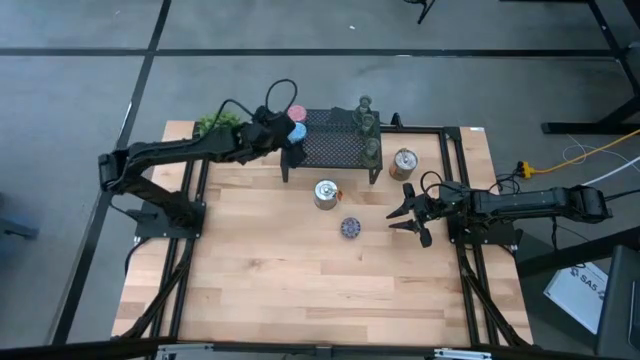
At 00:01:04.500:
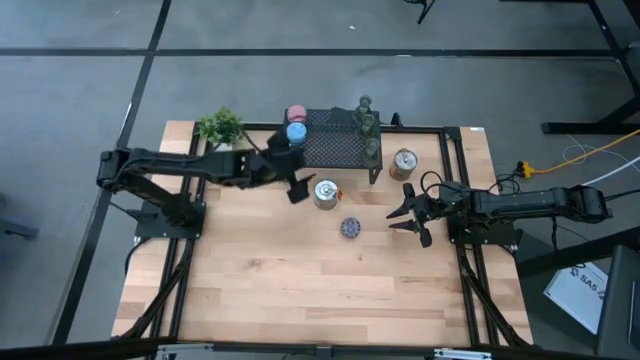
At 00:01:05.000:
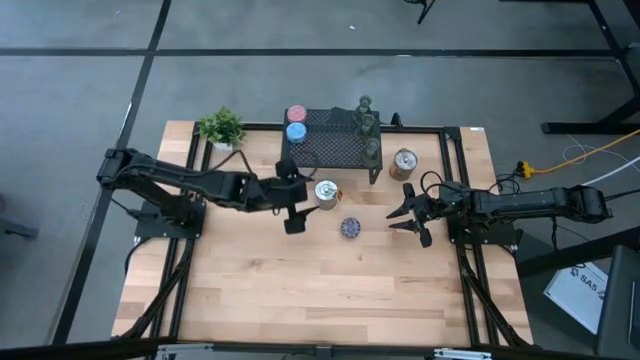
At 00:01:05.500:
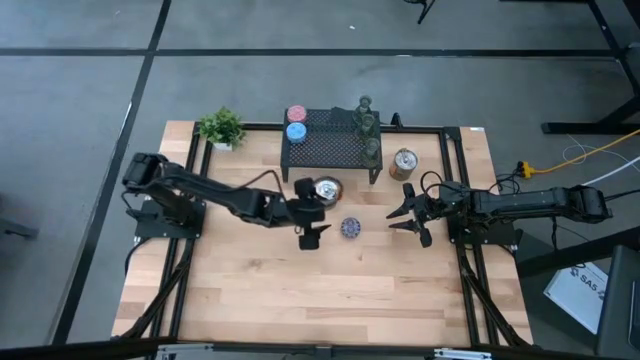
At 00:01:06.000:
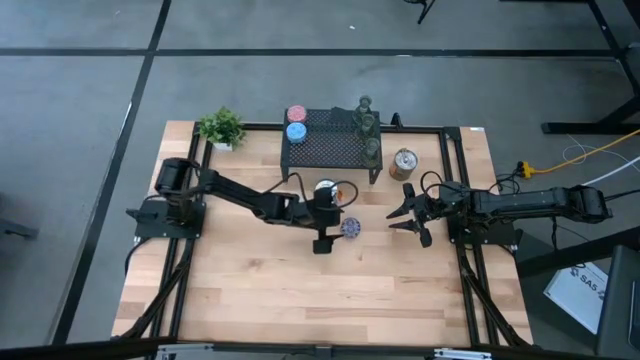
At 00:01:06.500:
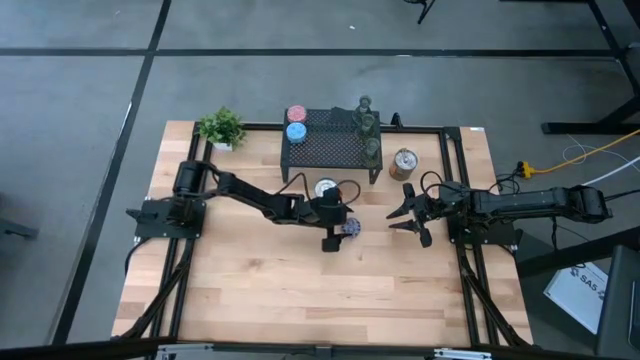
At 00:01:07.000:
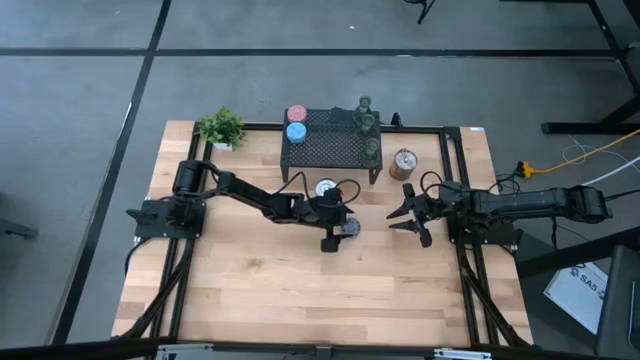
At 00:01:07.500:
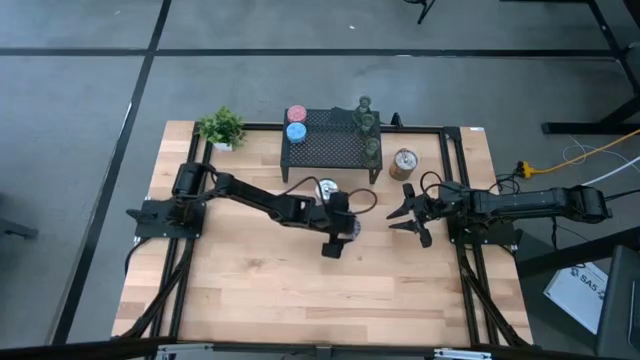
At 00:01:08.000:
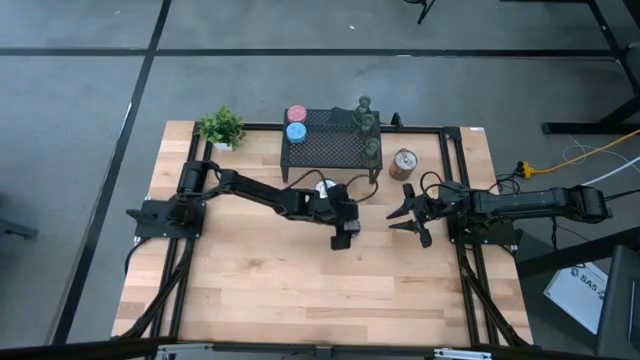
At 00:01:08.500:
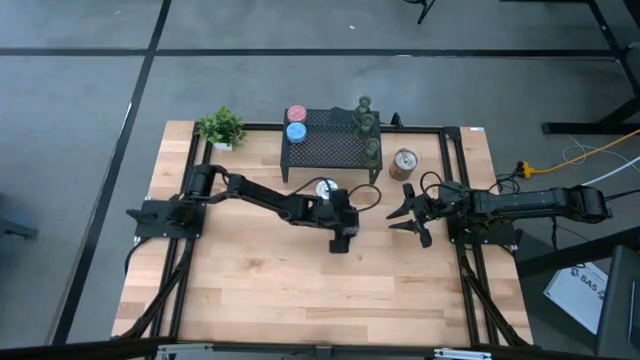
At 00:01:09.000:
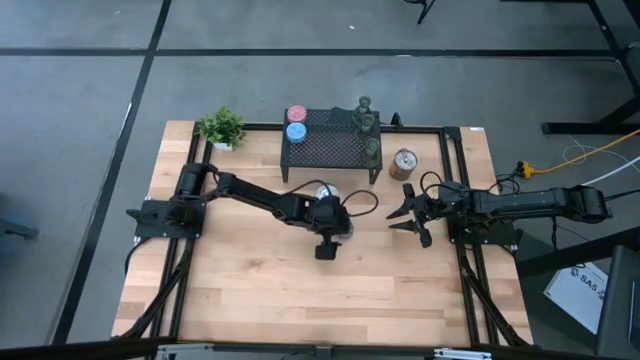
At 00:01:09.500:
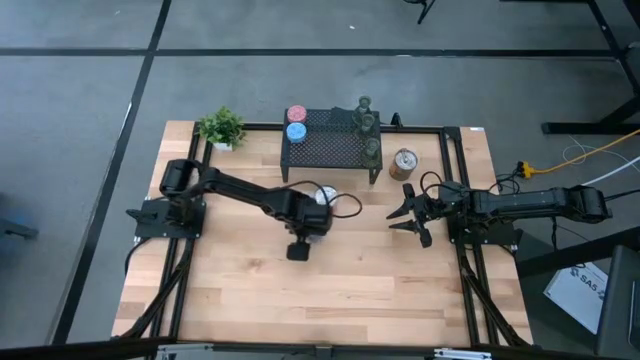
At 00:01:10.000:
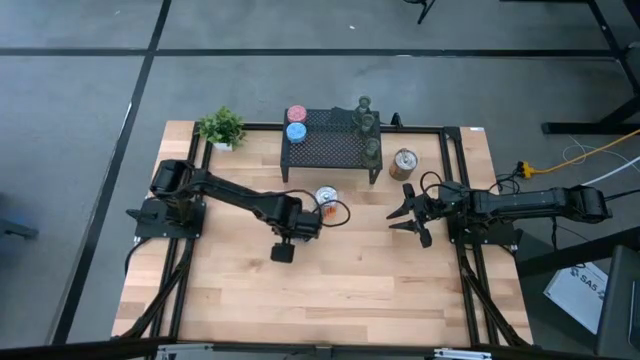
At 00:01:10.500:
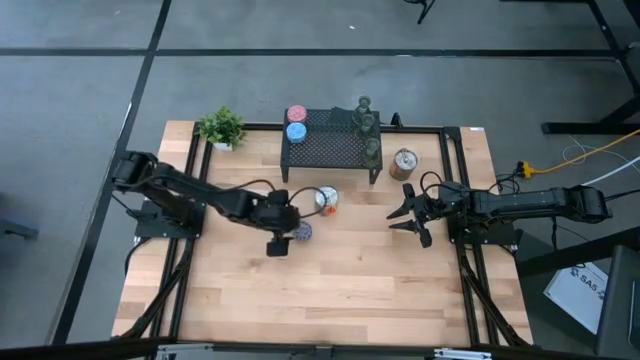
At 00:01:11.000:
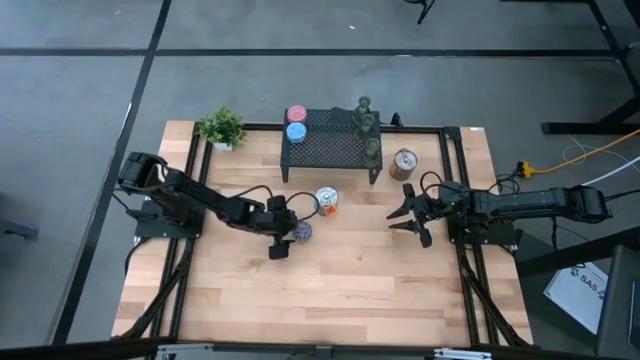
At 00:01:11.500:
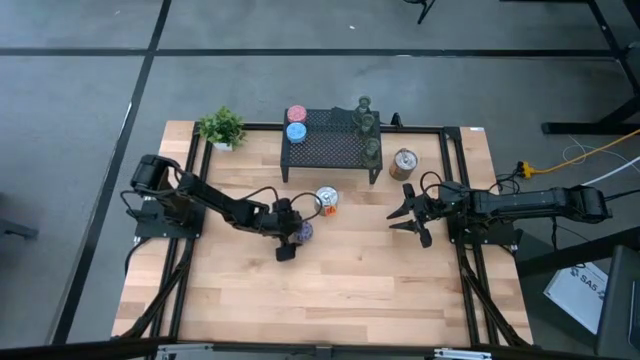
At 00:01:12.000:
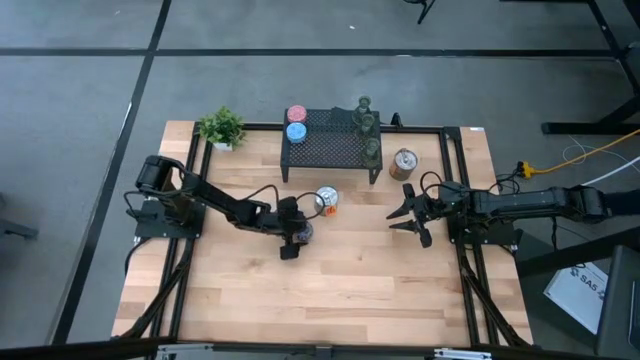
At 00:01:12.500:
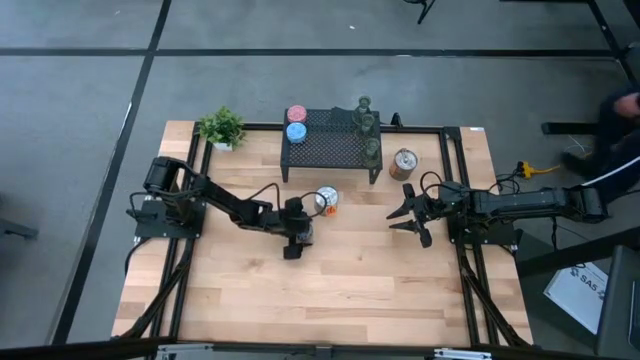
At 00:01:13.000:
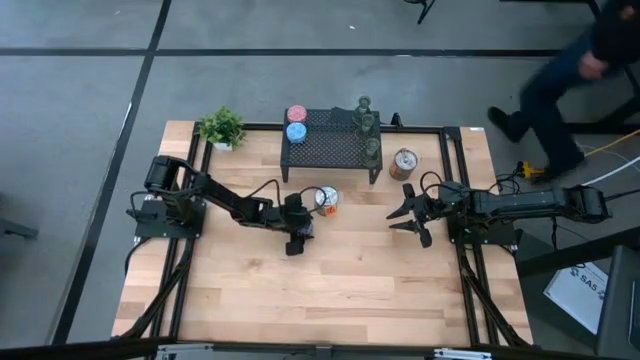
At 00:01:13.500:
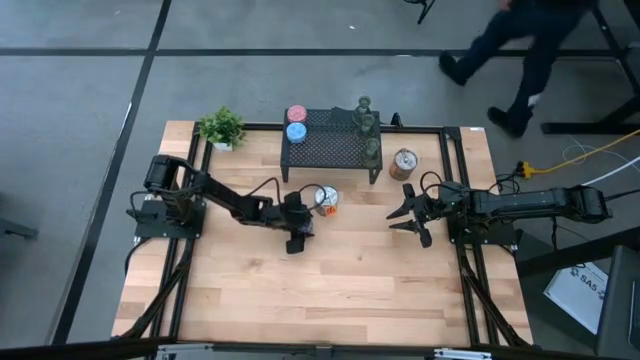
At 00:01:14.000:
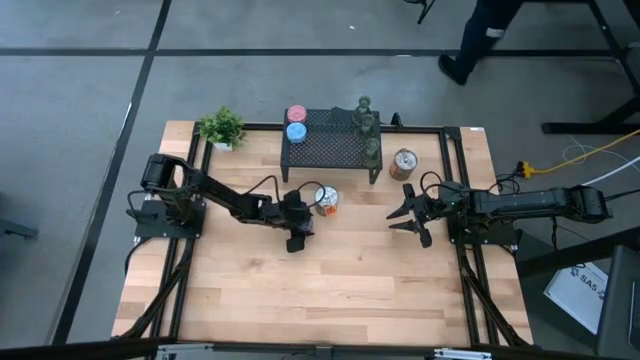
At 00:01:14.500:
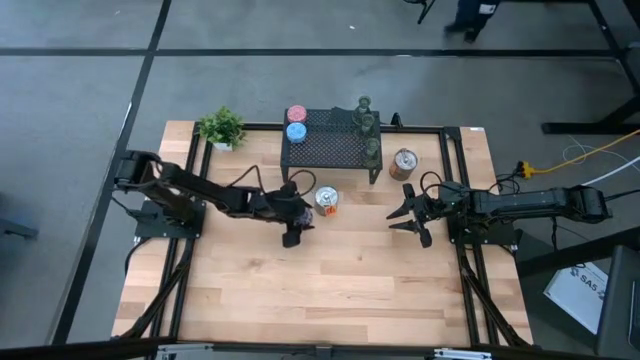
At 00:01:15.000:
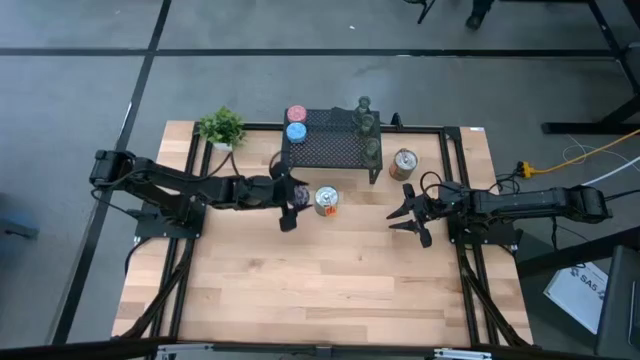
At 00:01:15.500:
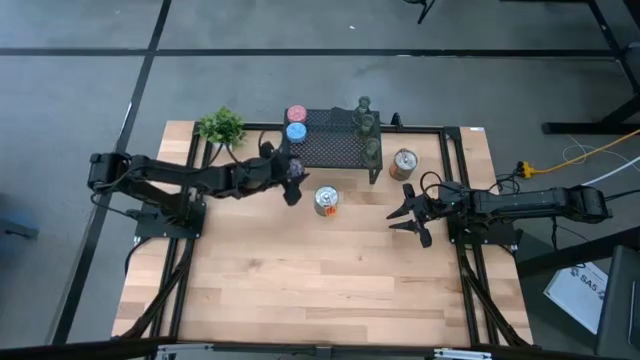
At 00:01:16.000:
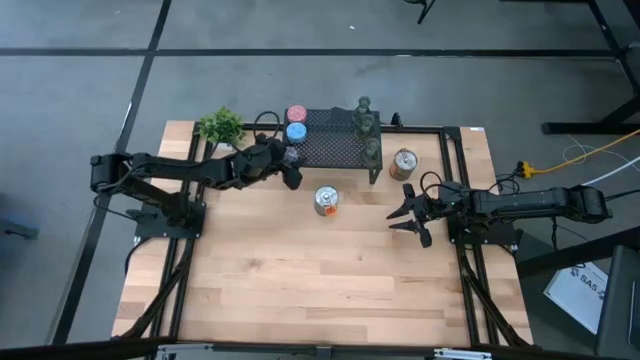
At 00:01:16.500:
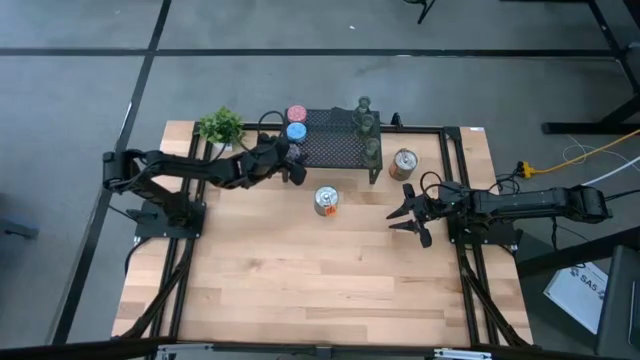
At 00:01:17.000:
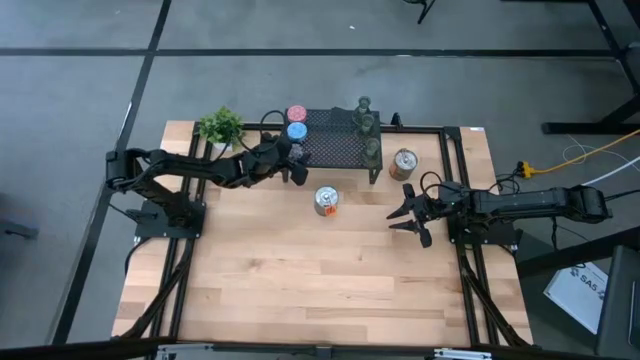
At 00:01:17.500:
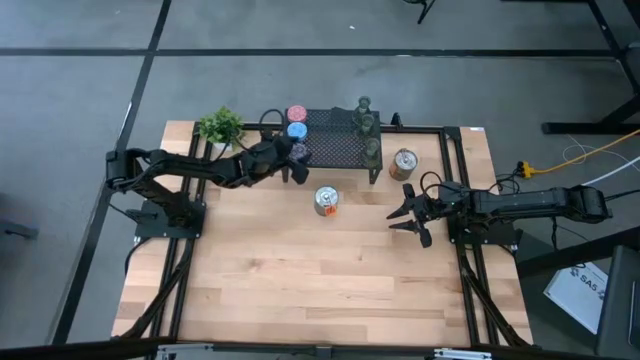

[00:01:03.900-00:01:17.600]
Task: Pick & Place candle stick holders
Put the black scented candle on the shelf

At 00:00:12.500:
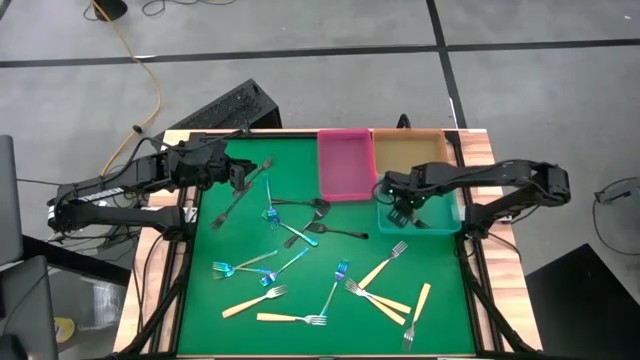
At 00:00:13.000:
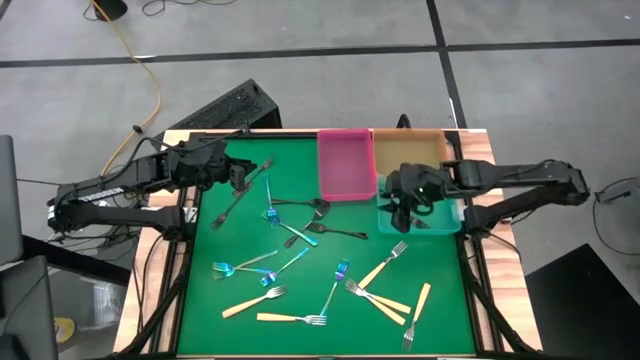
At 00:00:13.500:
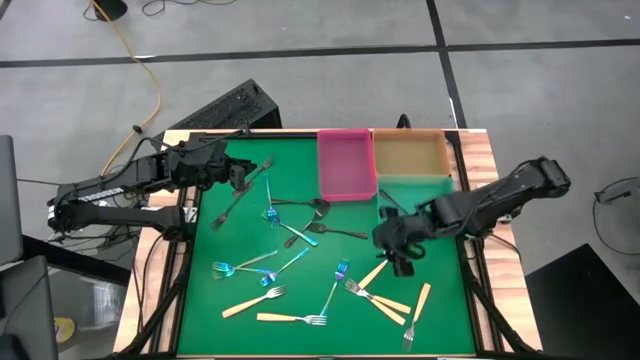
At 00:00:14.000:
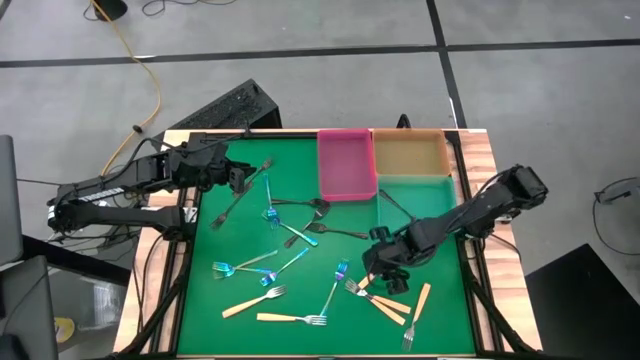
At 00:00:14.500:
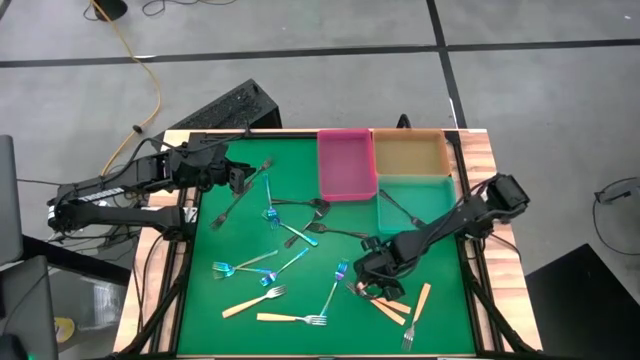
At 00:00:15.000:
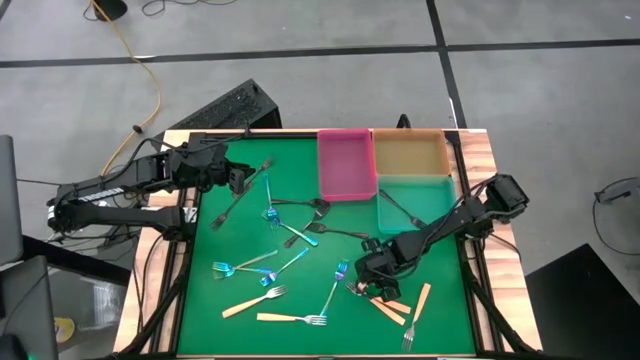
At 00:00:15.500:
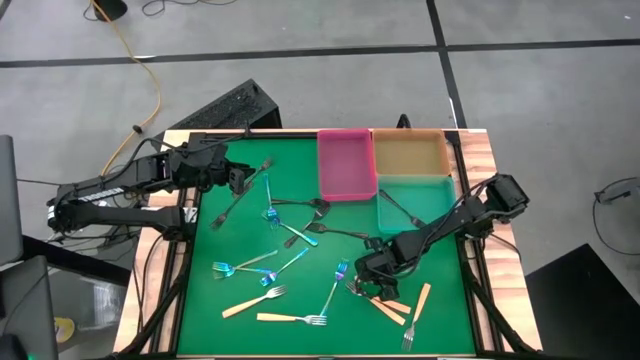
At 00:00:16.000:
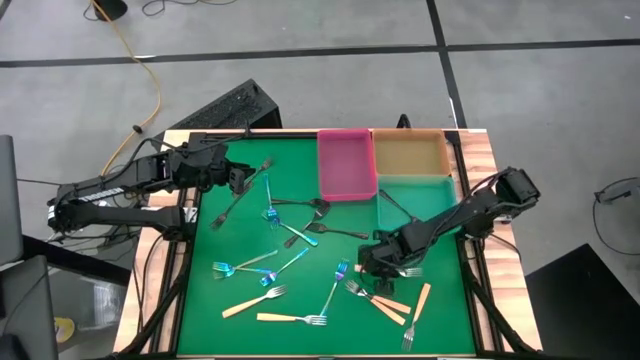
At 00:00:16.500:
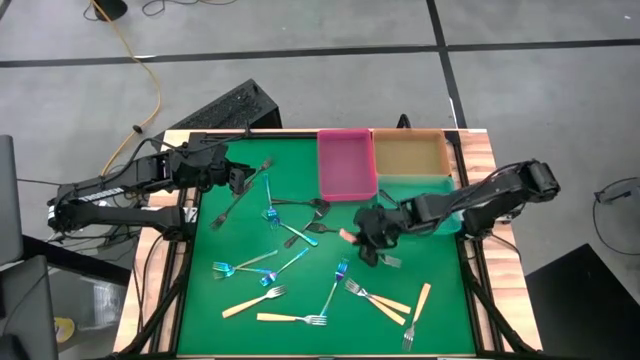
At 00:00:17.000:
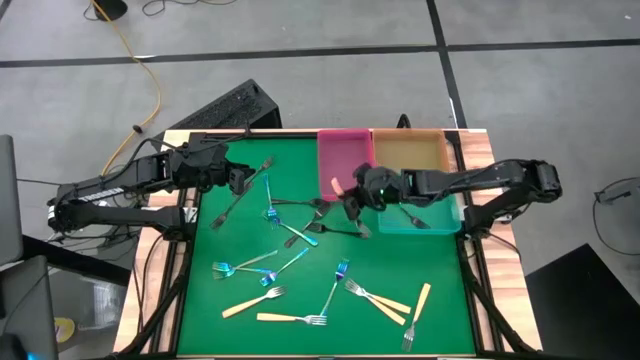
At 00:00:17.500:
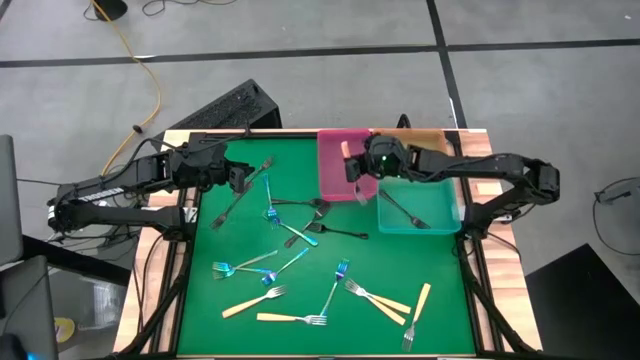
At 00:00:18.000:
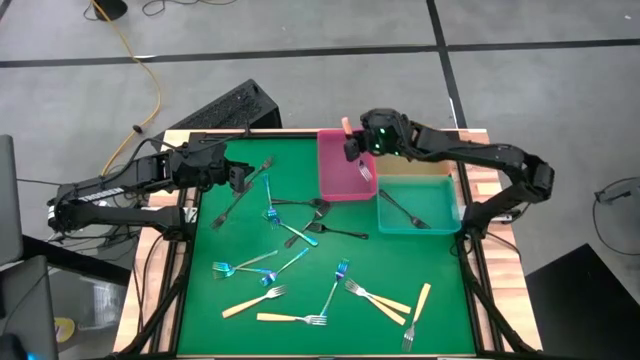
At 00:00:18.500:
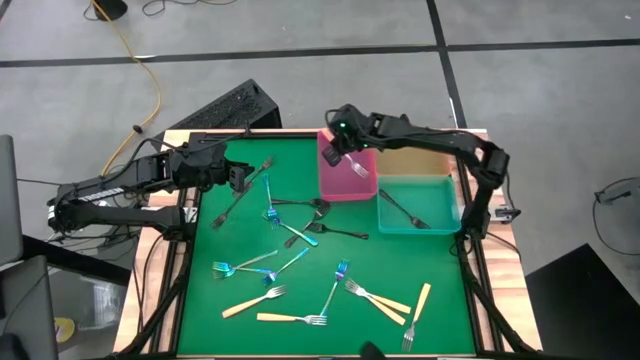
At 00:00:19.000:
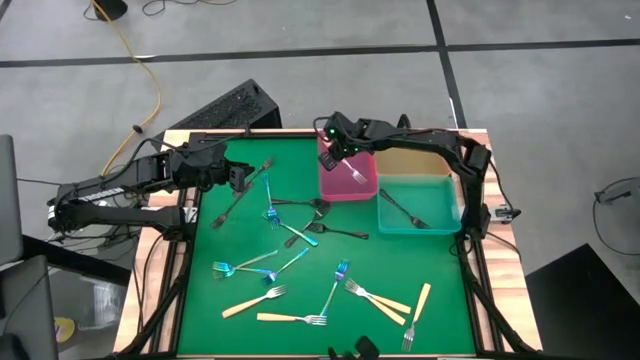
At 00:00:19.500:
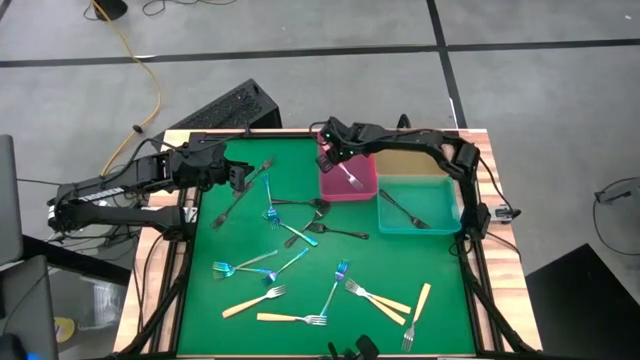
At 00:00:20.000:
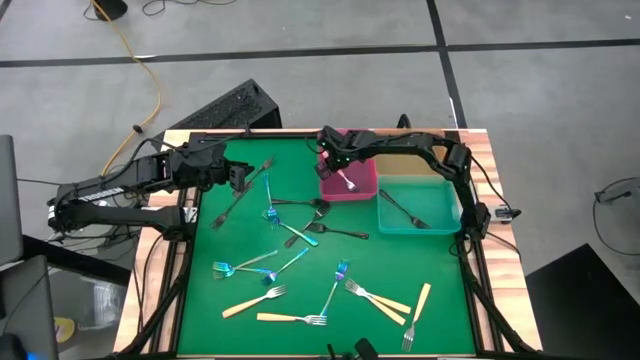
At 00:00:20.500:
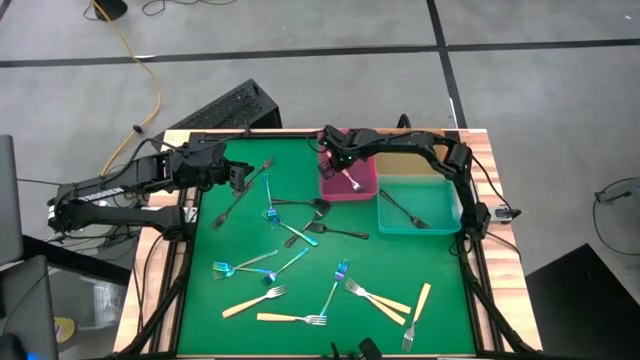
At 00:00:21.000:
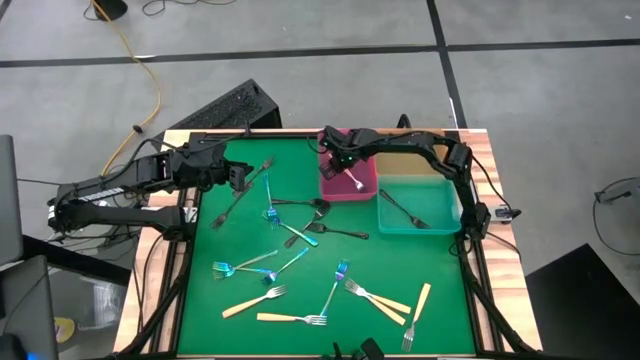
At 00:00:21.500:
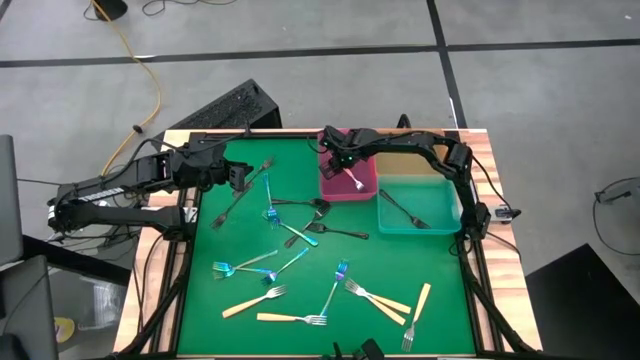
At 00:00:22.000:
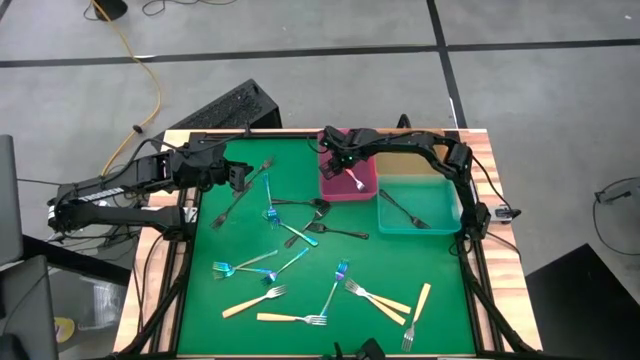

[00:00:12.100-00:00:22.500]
Task: Sort silverware by color (type)
Put the yellow fork into the pink bin
